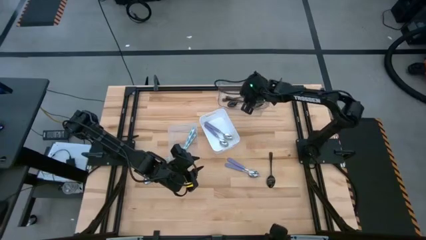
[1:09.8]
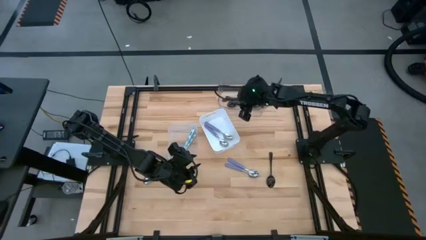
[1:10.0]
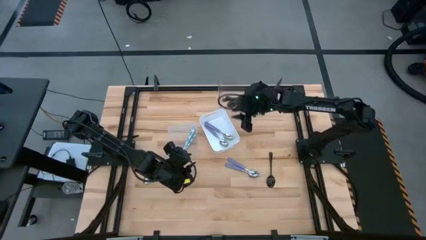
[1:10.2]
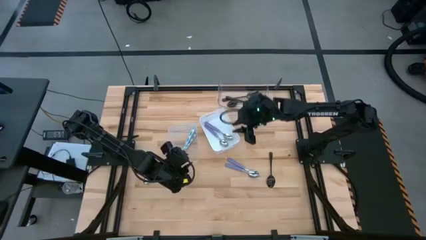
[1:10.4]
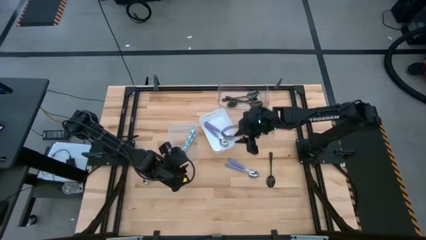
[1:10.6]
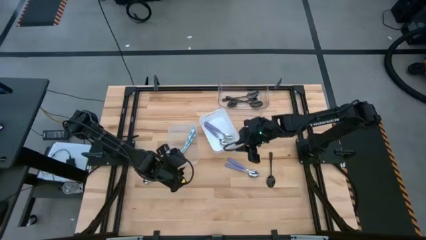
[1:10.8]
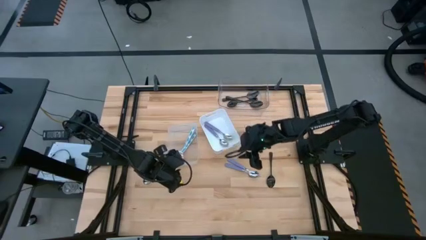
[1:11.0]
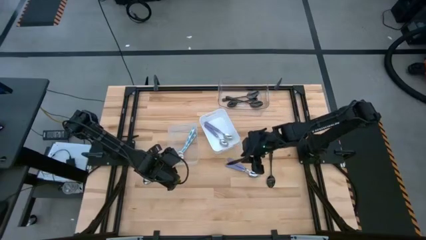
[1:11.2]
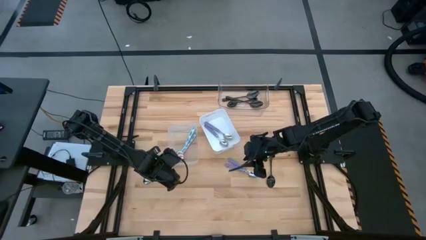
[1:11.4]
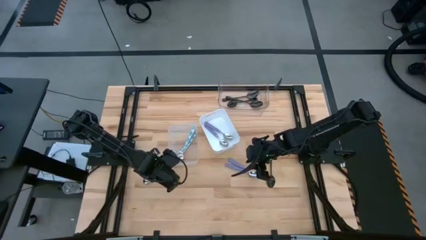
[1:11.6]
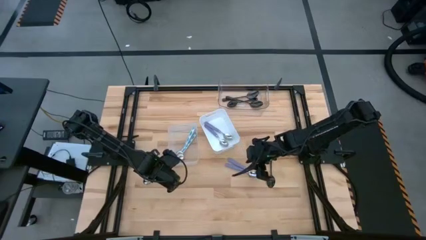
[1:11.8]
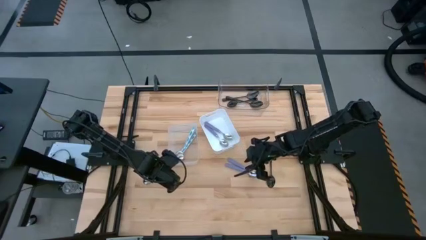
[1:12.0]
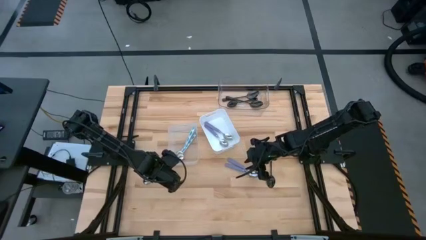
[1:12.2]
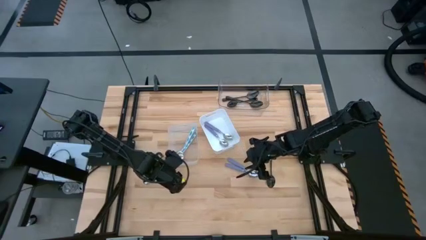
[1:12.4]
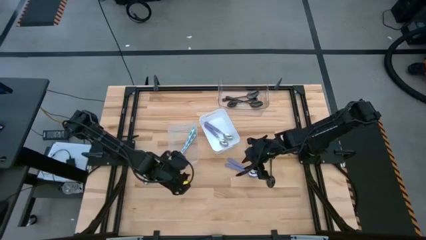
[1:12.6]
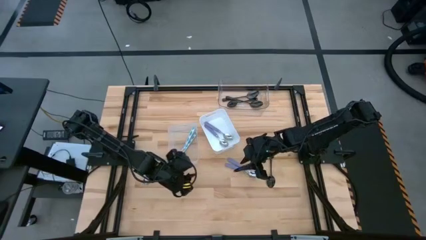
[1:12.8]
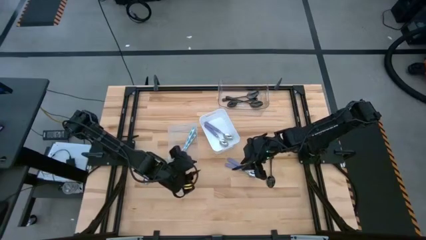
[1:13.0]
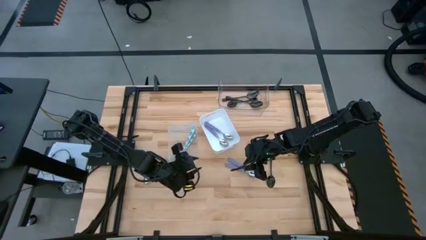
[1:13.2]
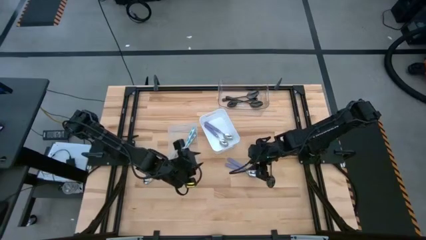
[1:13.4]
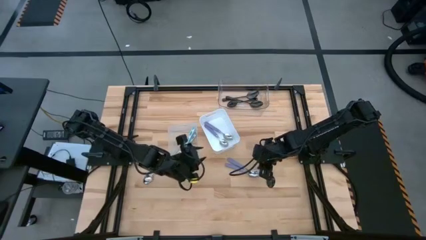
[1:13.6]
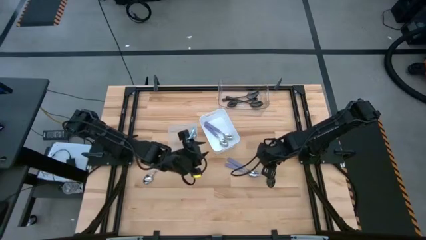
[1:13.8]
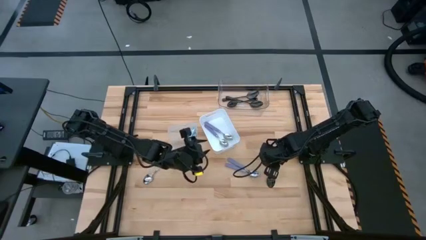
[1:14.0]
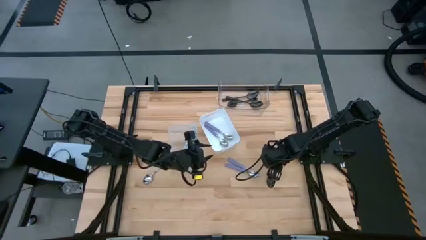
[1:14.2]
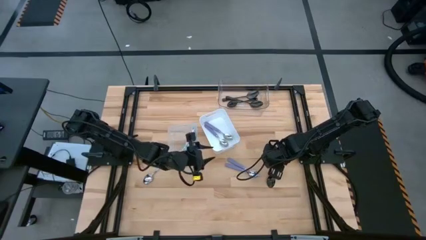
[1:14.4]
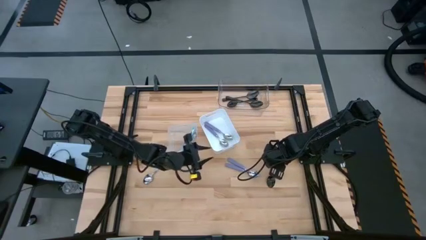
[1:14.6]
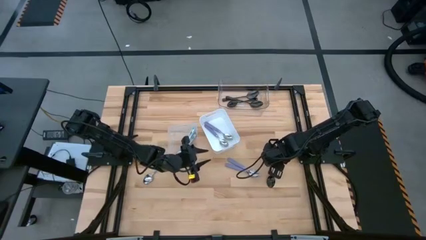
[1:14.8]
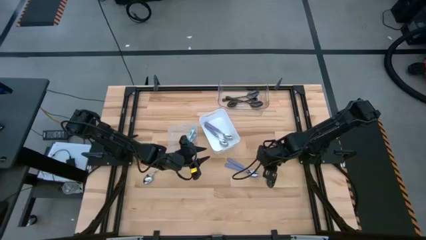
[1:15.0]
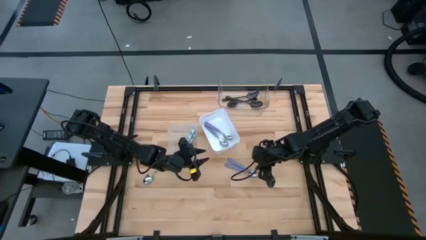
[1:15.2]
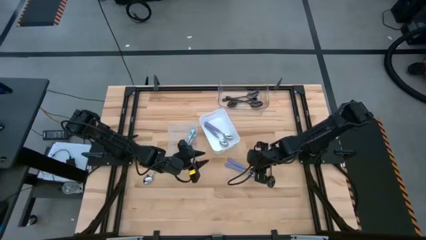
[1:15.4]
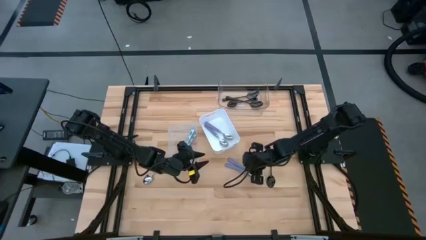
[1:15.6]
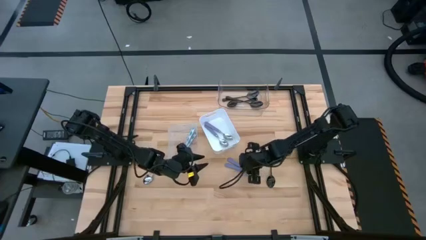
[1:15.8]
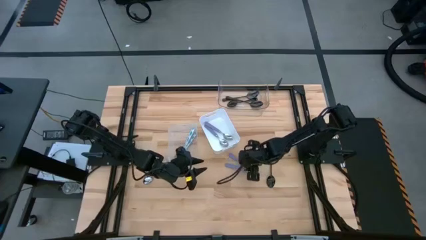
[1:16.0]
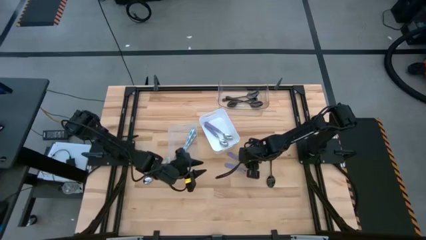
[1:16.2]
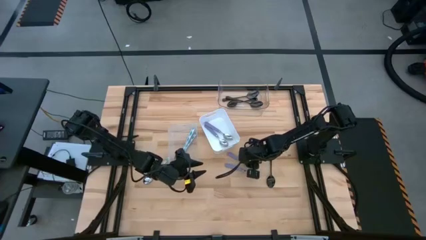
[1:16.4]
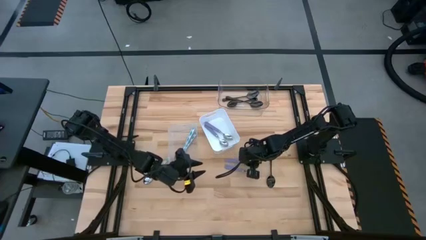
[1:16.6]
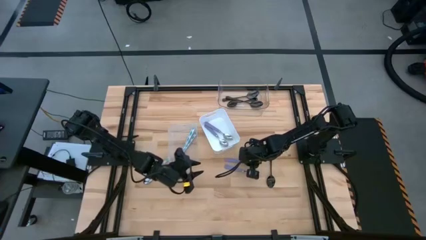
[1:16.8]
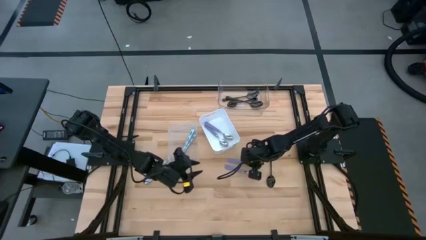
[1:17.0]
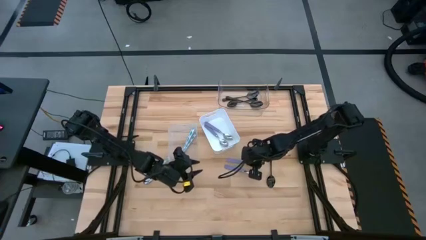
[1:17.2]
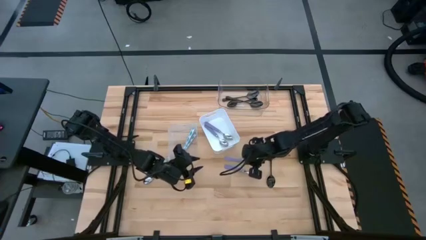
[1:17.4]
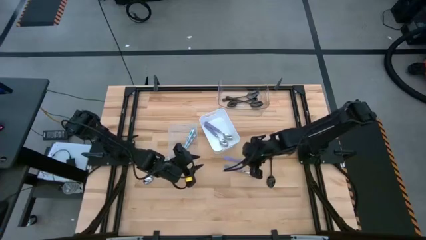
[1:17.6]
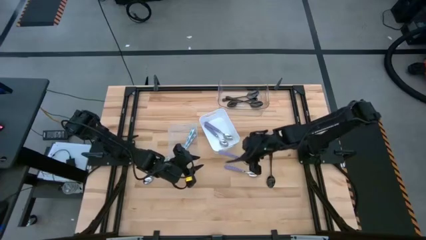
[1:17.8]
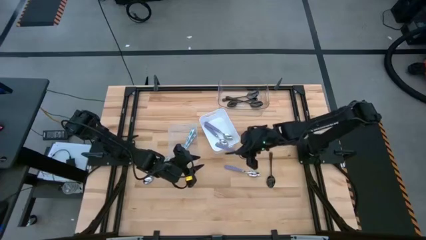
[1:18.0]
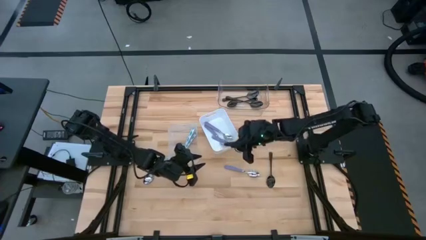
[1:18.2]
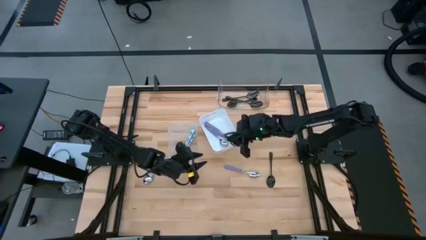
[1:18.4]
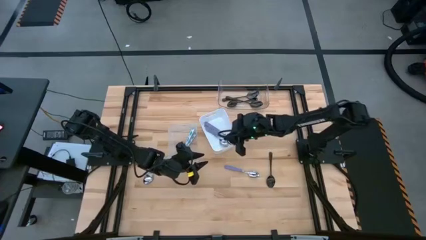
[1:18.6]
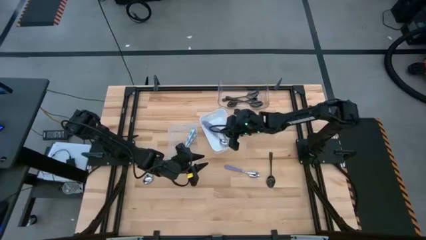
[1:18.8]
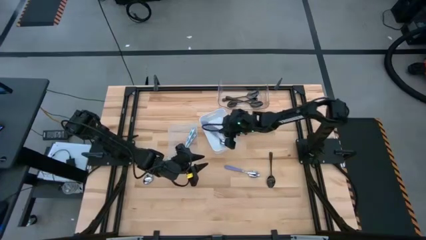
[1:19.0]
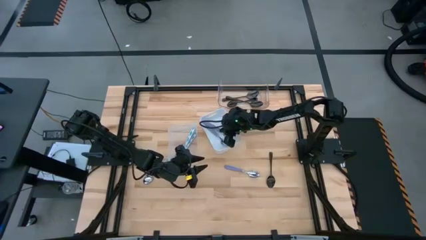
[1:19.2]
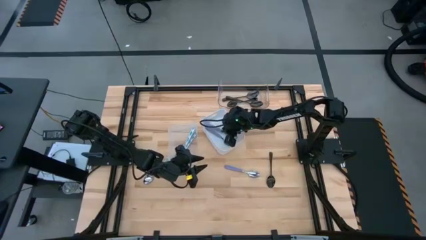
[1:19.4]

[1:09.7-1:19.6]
Task: Sort silverware by color (type)
Put the purple spoon into the white bin
